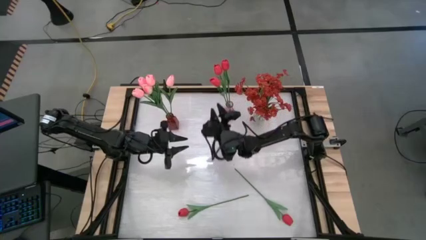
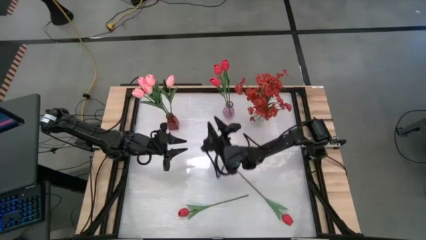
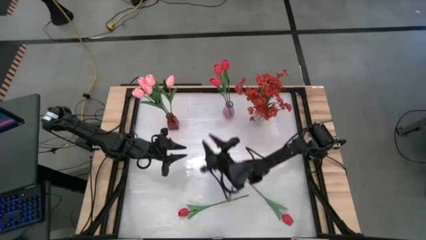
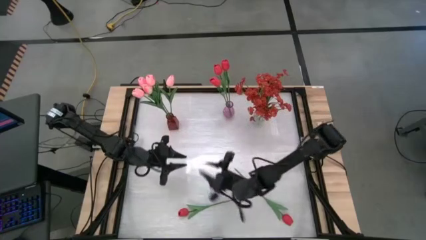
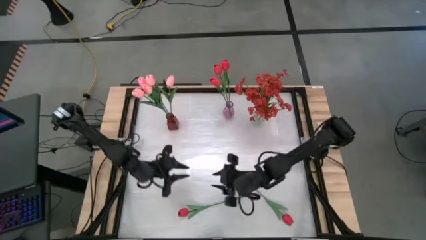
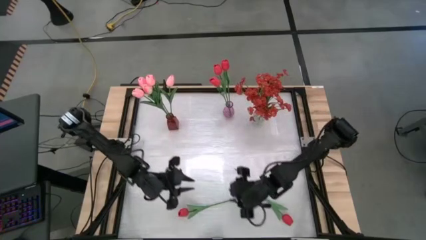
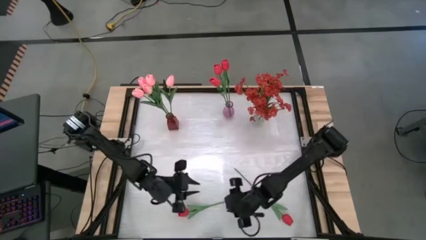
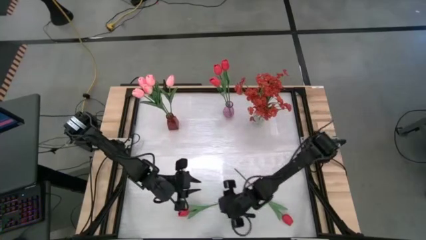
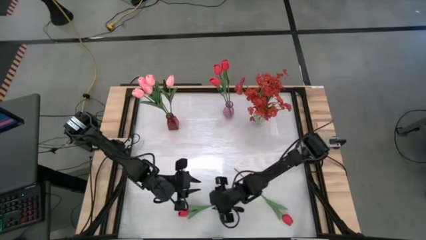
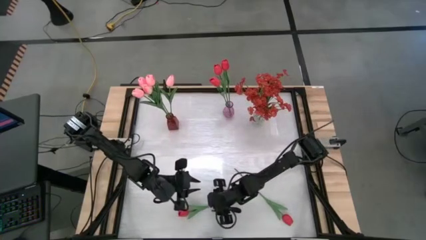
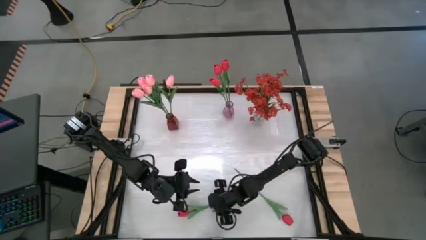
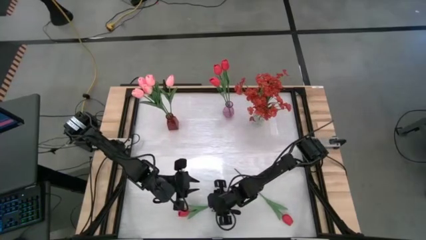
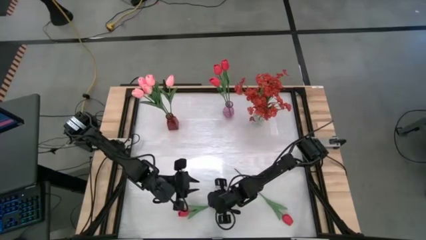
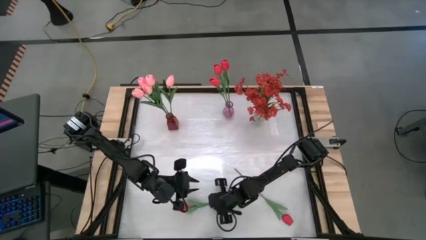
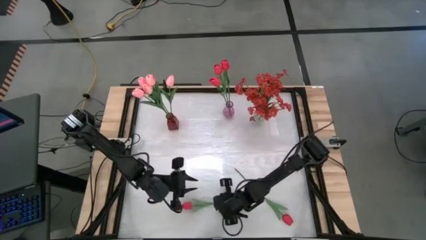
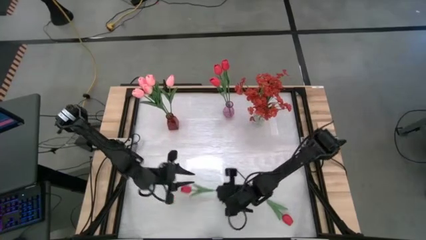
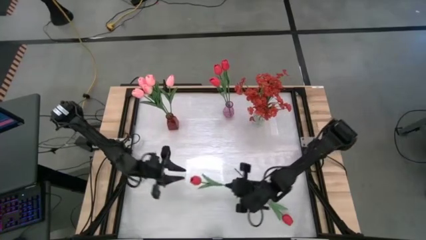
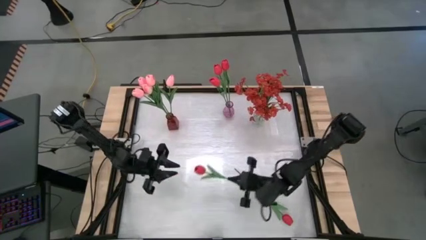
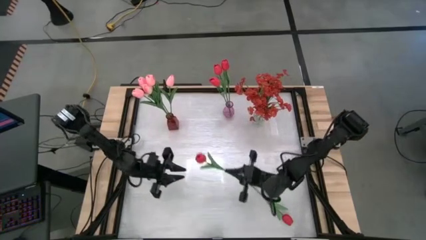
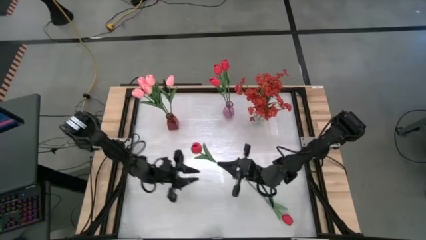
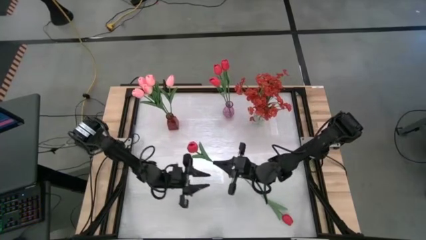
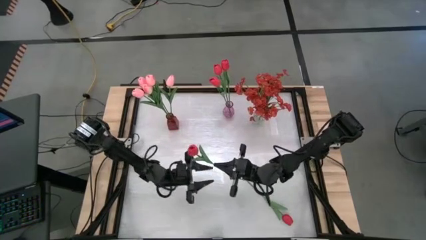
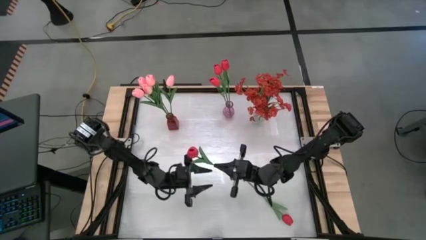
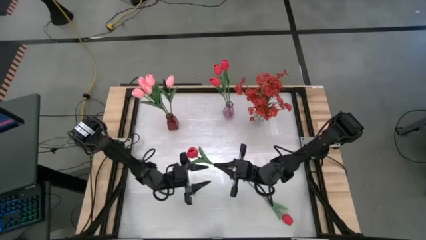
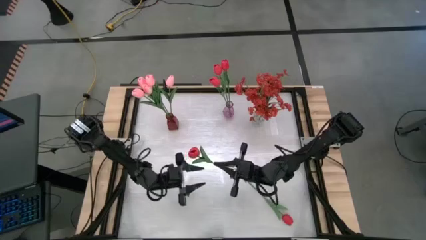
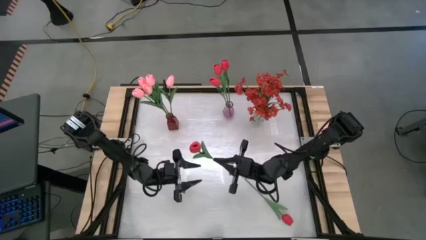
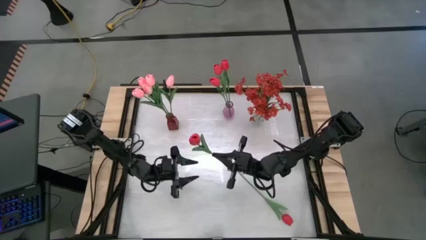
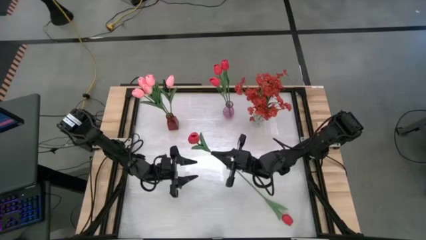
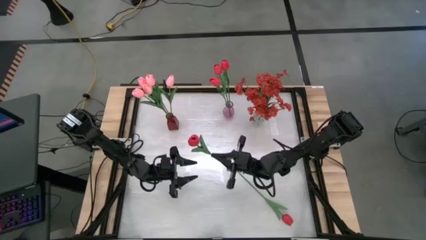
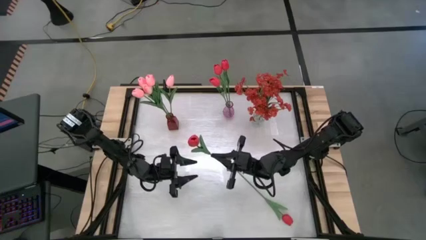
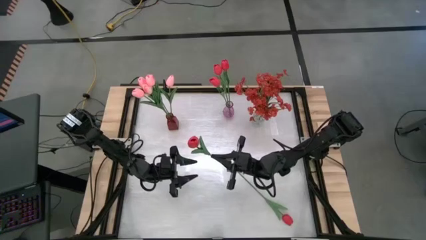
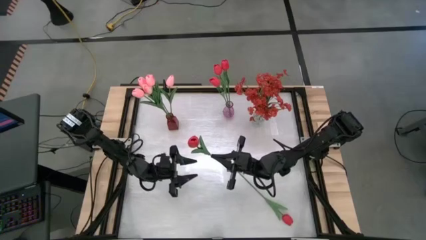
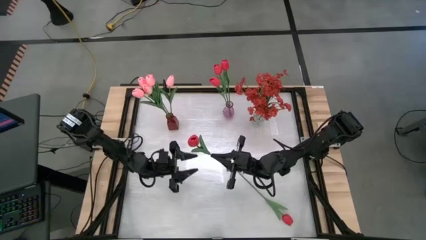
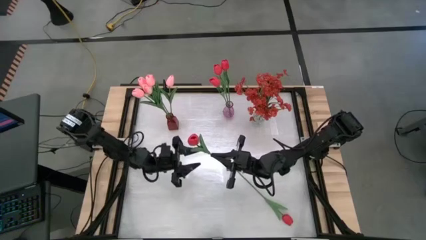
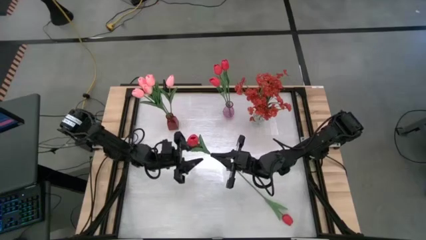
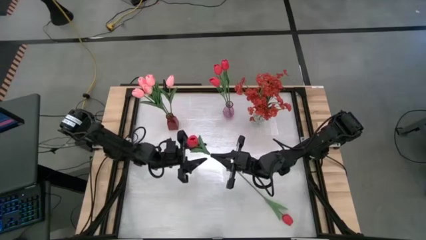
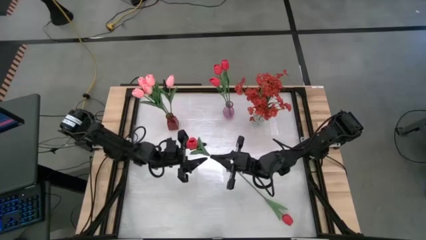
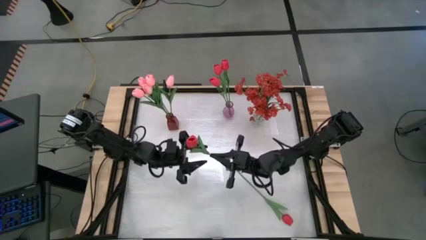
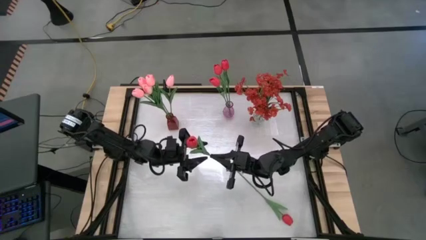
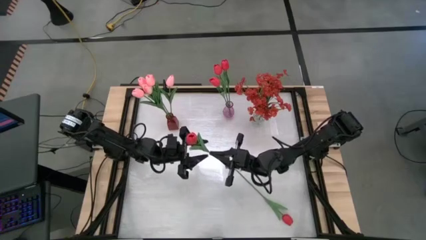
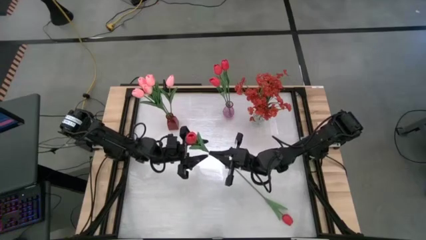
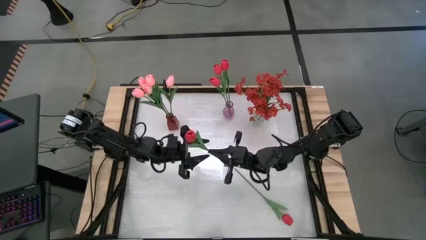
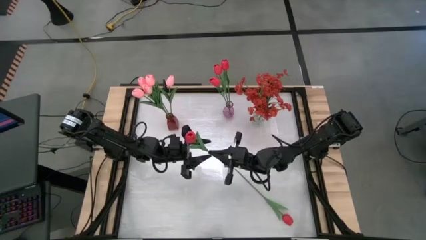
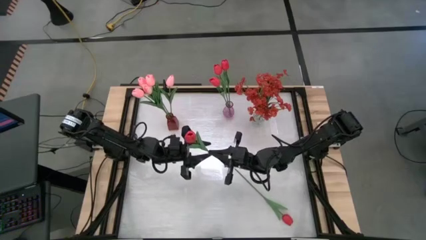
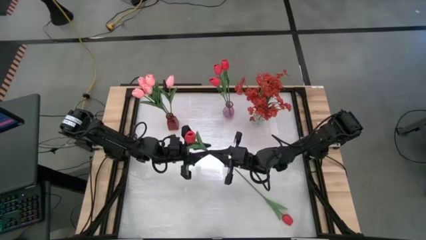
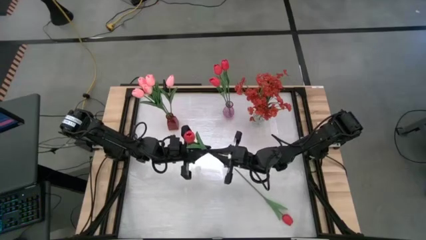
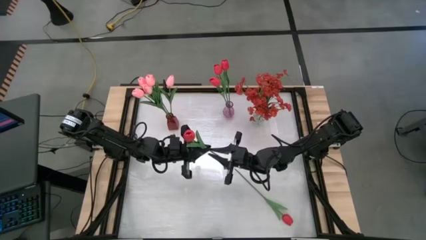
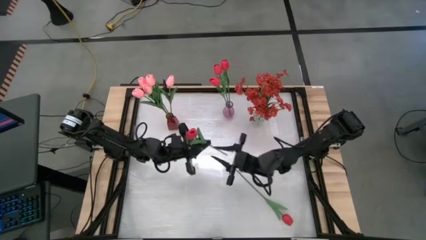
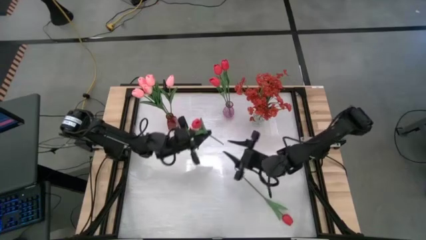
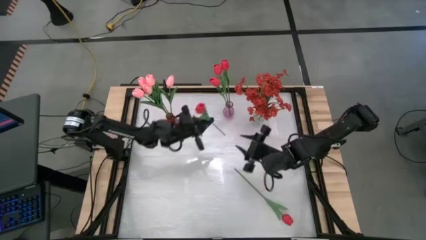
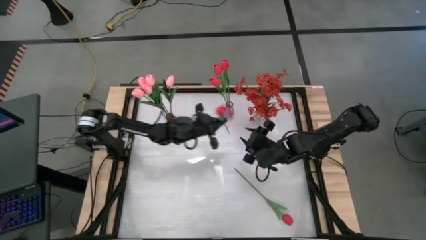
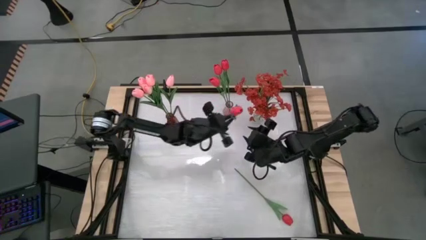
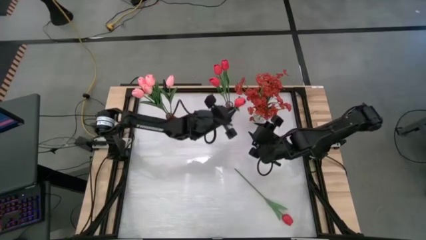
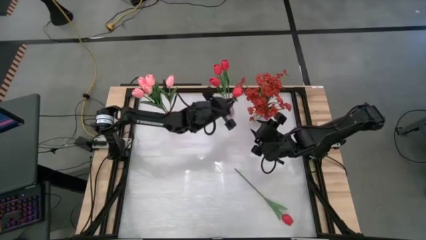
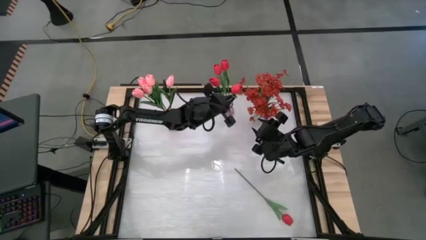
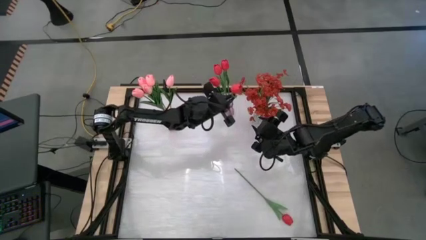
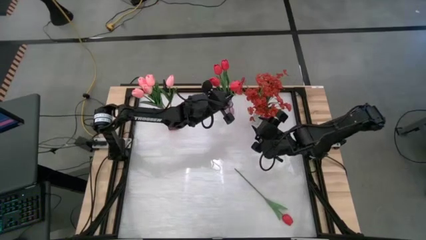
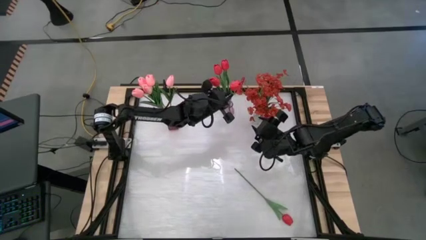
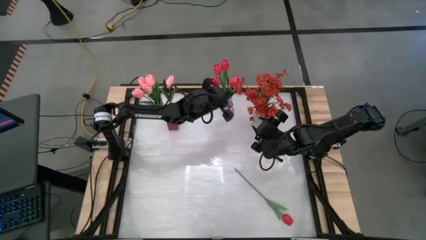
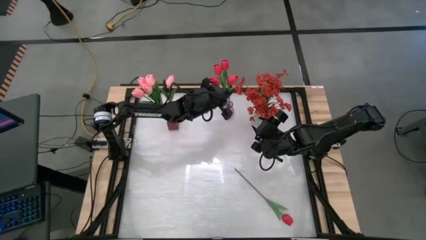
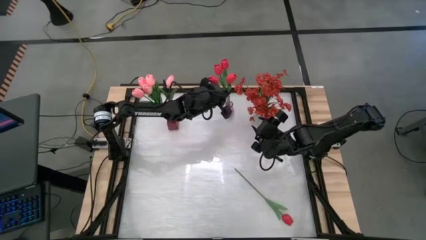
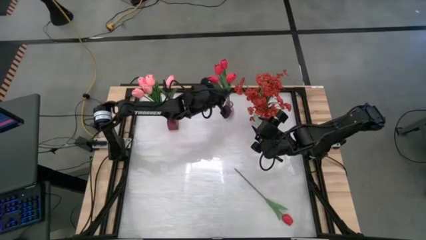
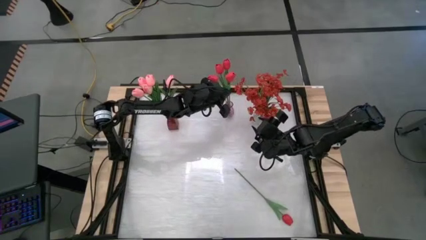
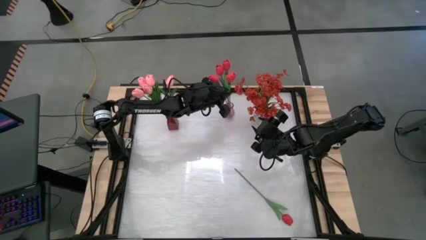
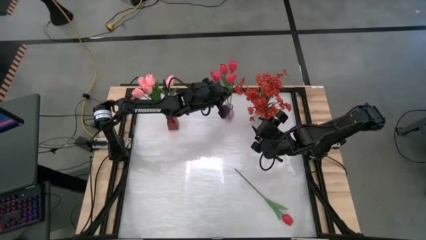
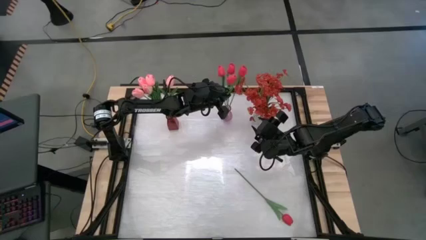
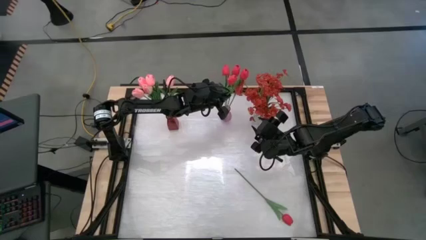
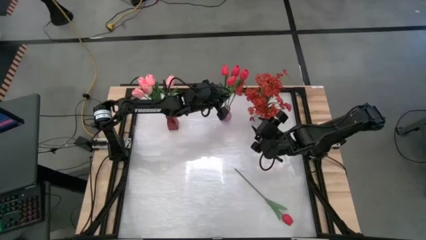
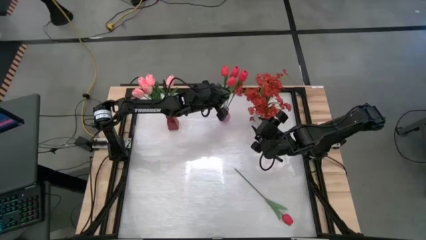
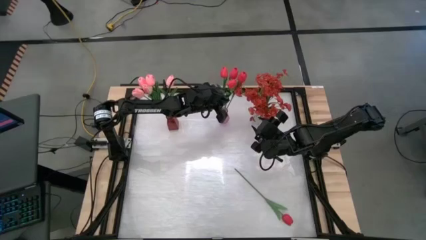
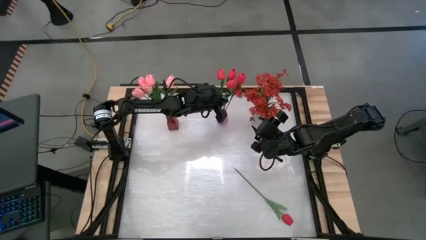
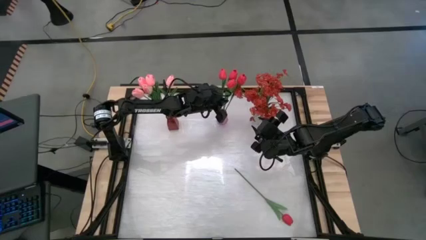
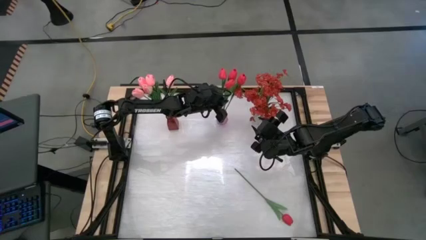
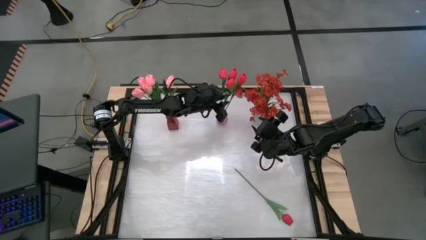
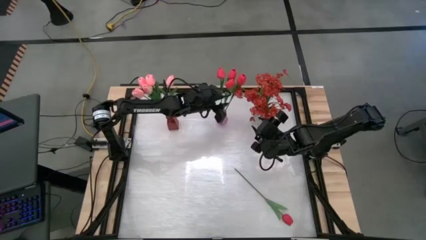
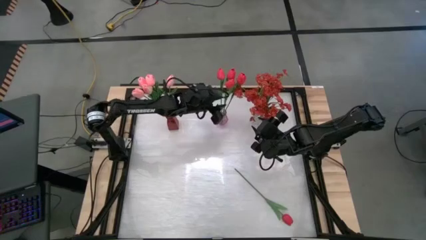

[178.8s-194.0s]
Task: Sort flowers into vase by color
Put the red tulip into the purple vase

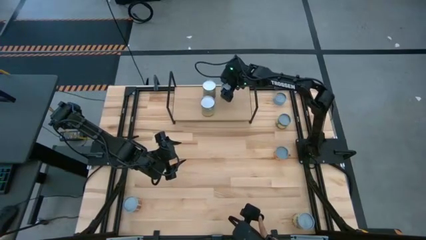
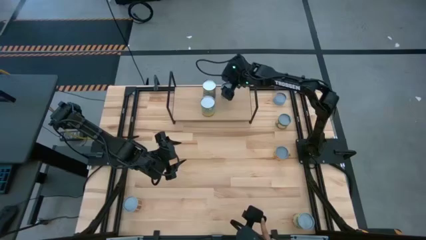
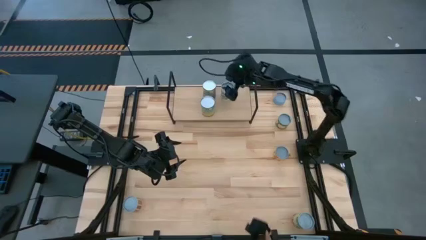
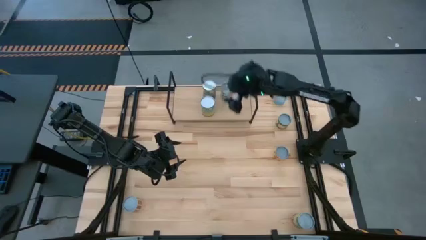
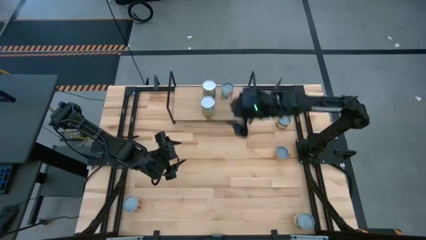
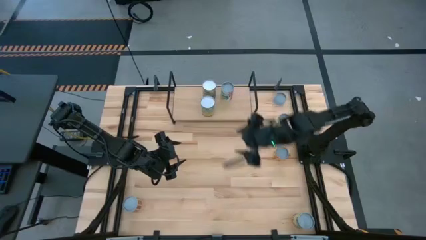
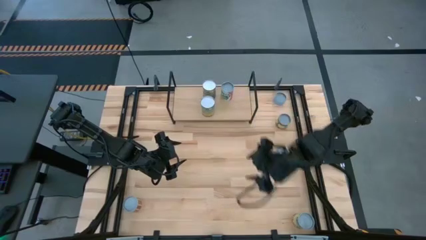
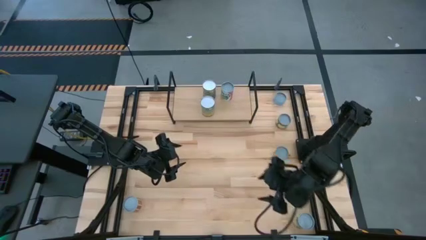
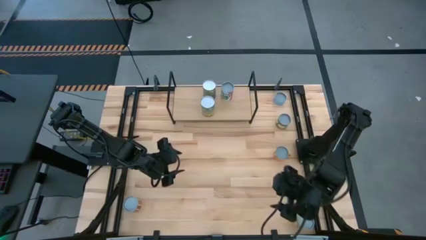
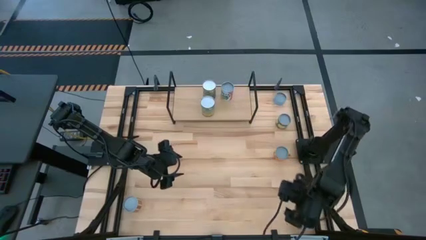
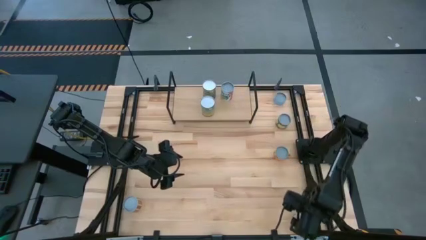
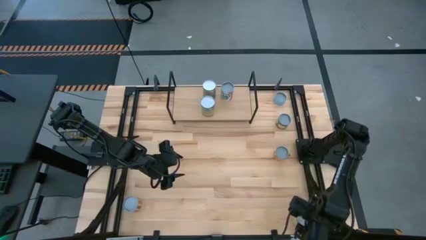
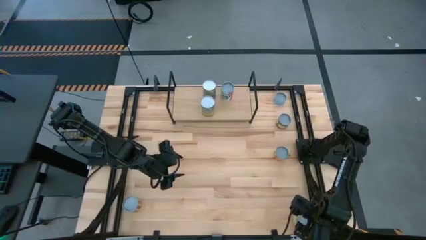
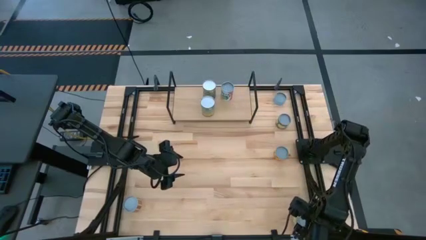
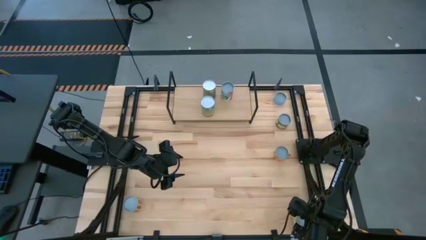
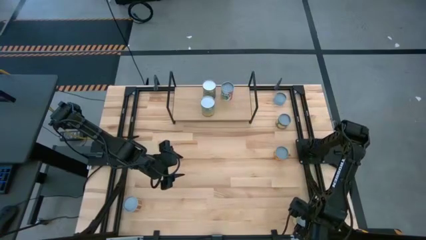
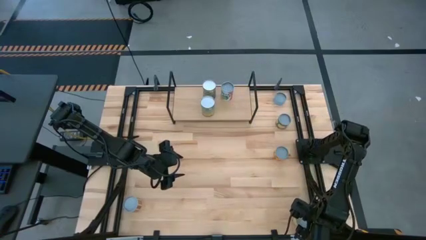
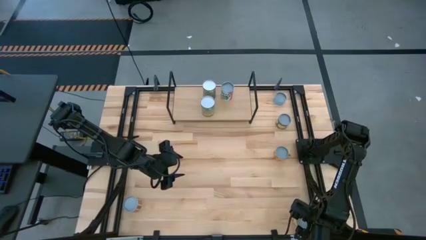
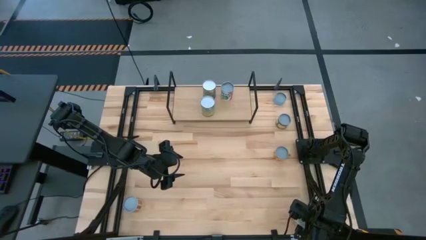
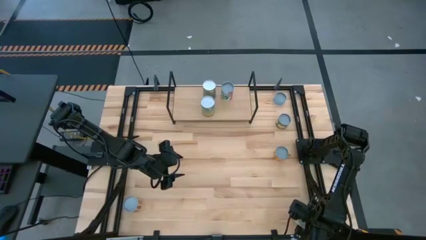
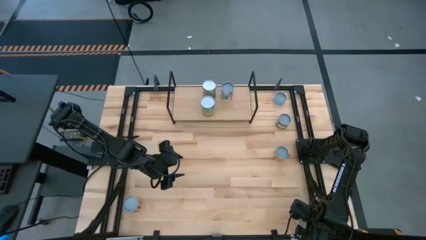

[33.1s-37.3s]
Task: Pick and place cans onto a shelf
Put the canned spaghetti sauce on the shelf
